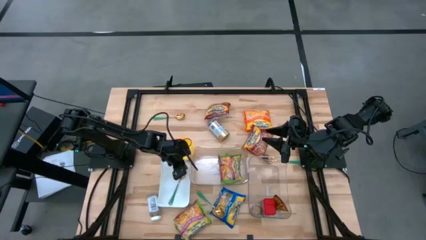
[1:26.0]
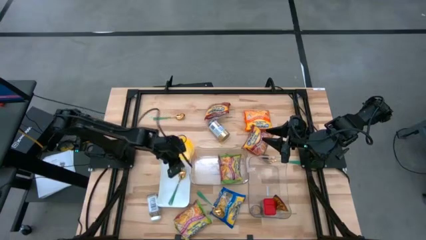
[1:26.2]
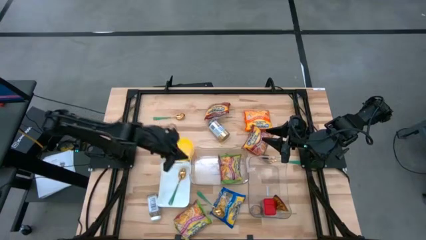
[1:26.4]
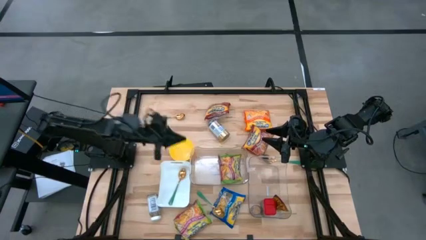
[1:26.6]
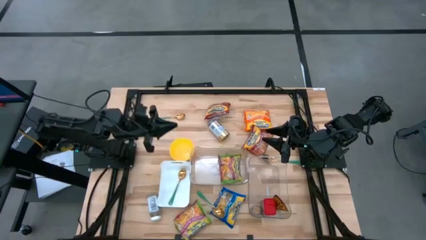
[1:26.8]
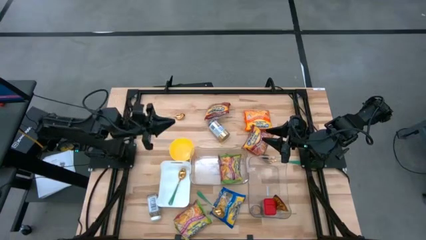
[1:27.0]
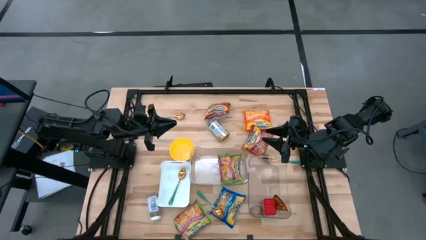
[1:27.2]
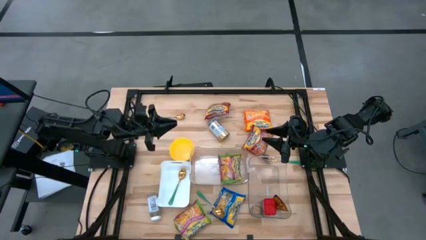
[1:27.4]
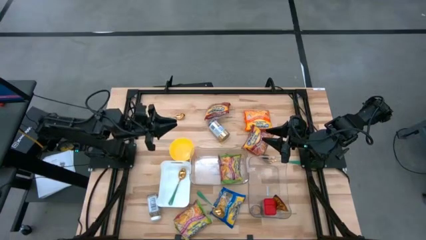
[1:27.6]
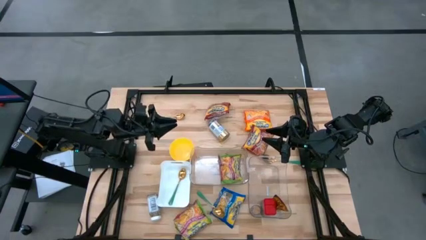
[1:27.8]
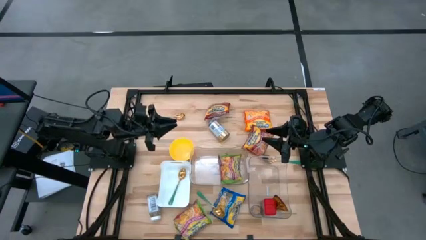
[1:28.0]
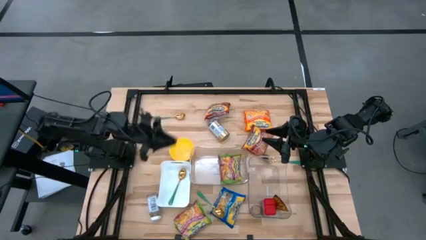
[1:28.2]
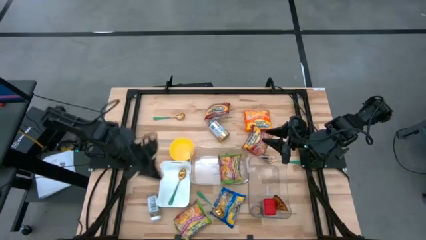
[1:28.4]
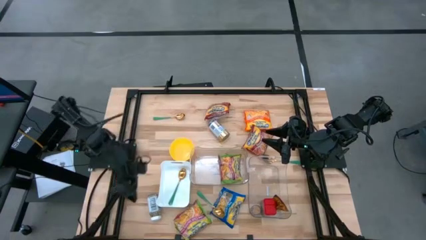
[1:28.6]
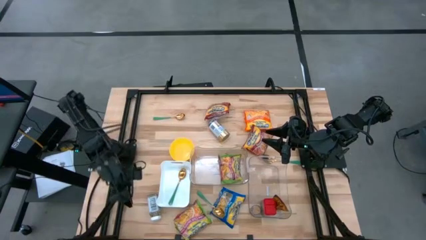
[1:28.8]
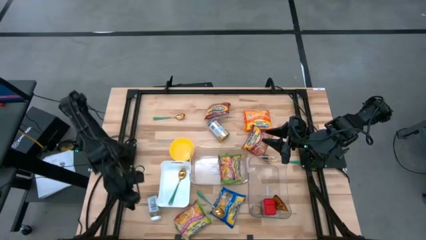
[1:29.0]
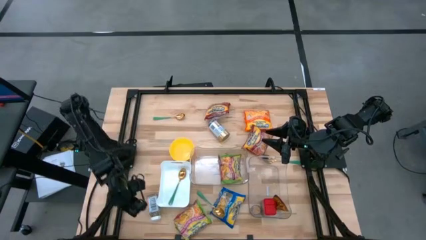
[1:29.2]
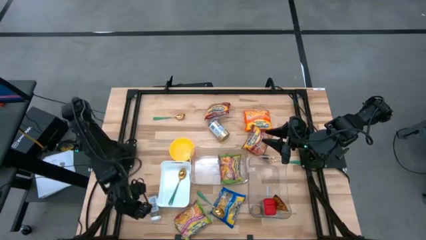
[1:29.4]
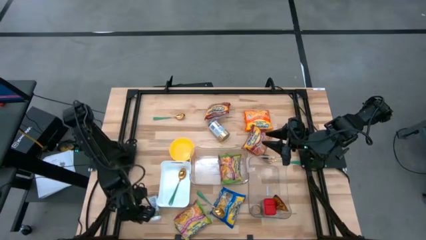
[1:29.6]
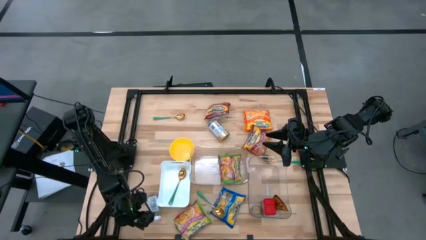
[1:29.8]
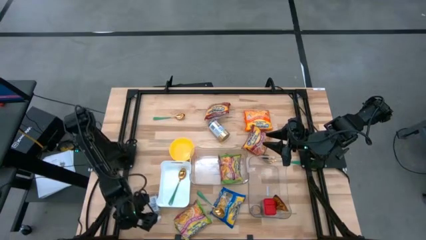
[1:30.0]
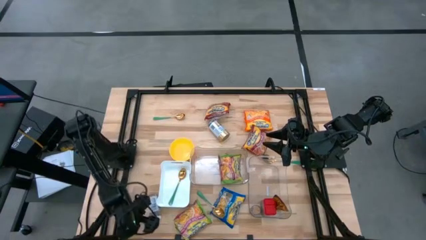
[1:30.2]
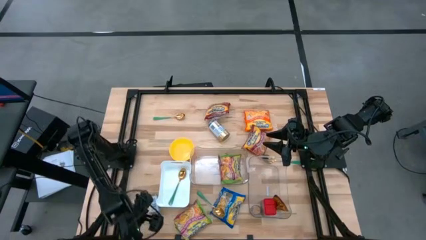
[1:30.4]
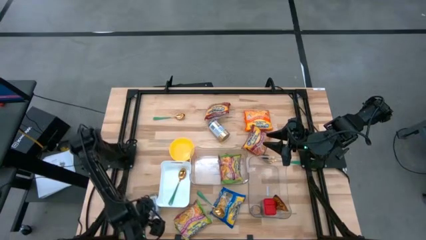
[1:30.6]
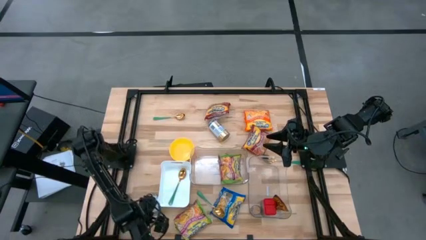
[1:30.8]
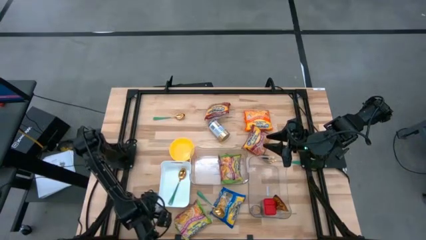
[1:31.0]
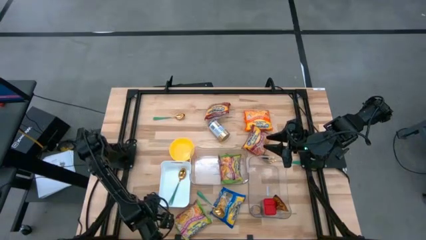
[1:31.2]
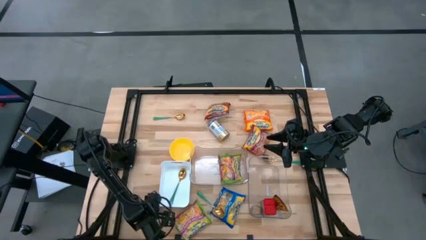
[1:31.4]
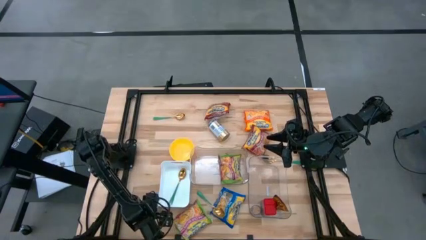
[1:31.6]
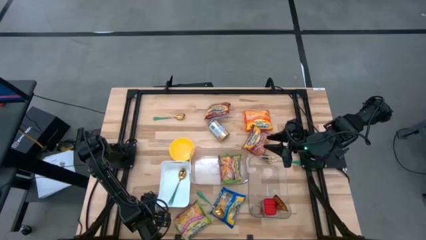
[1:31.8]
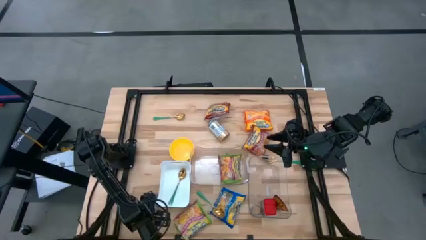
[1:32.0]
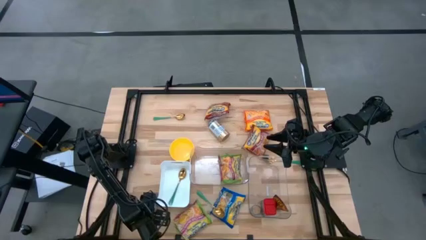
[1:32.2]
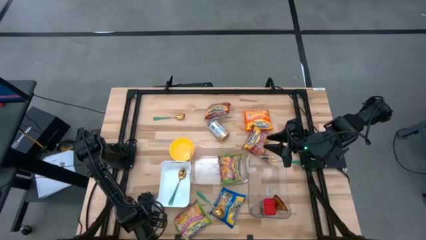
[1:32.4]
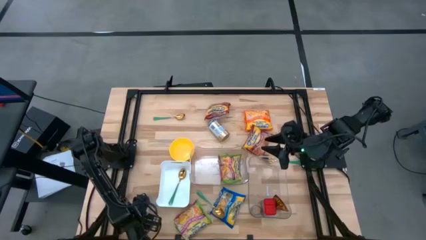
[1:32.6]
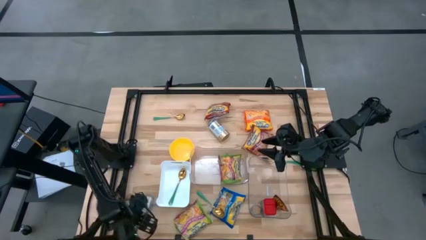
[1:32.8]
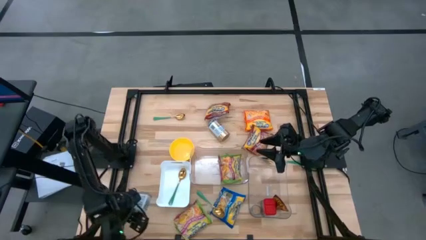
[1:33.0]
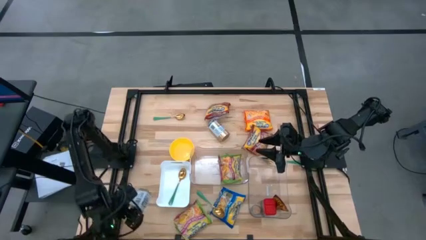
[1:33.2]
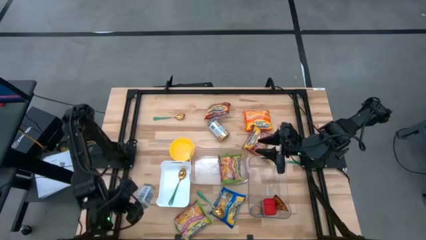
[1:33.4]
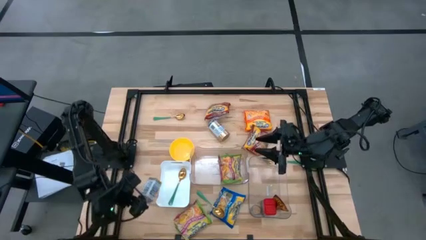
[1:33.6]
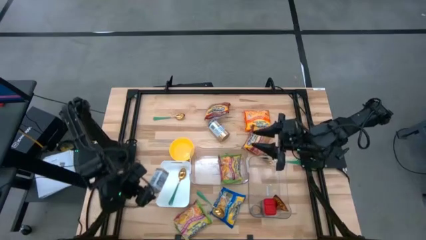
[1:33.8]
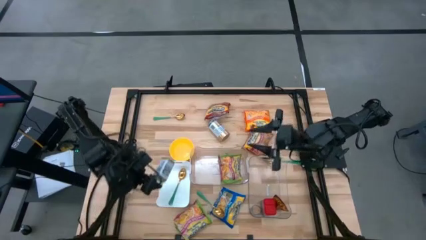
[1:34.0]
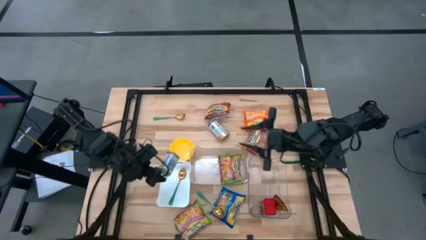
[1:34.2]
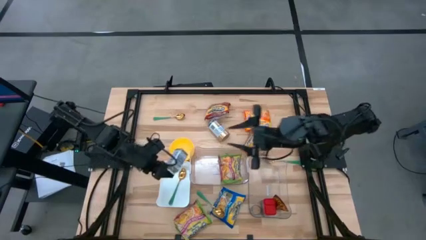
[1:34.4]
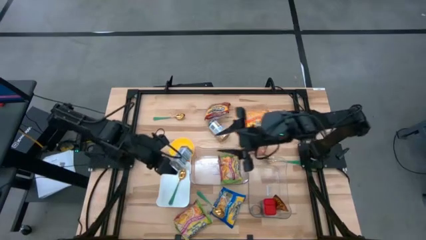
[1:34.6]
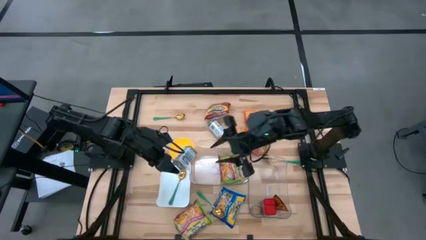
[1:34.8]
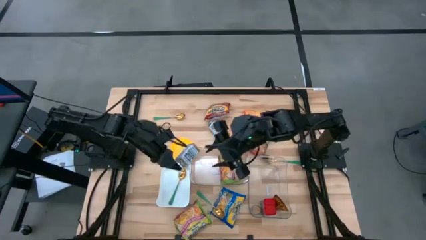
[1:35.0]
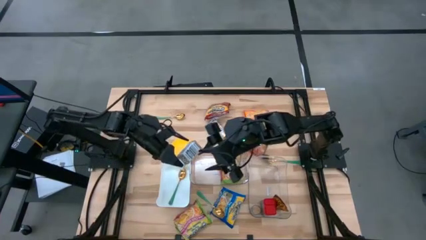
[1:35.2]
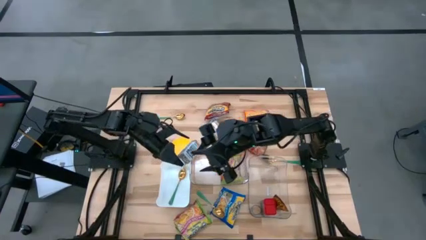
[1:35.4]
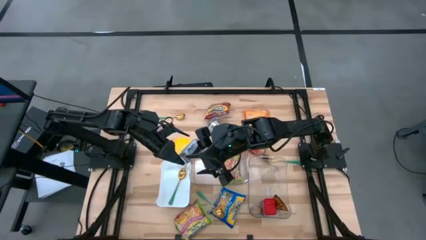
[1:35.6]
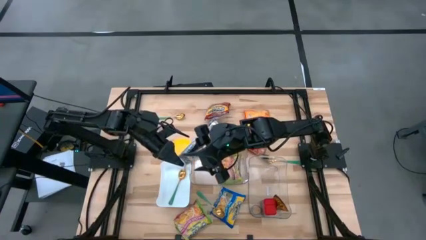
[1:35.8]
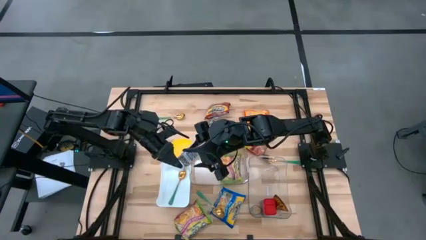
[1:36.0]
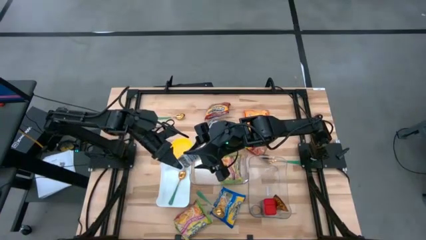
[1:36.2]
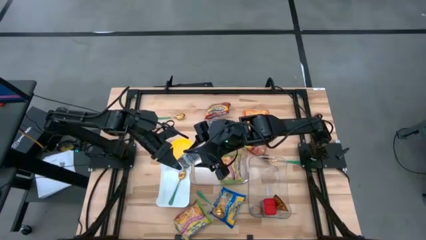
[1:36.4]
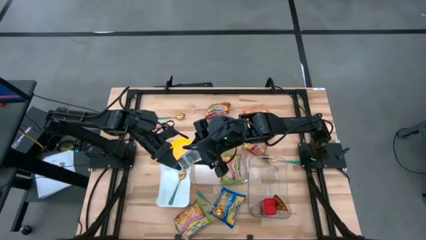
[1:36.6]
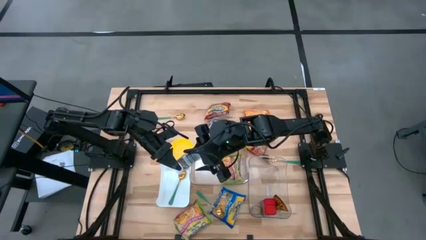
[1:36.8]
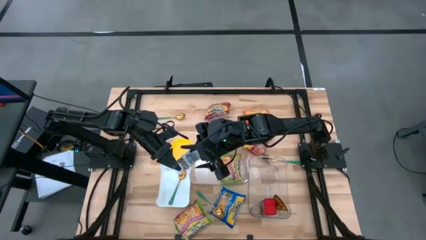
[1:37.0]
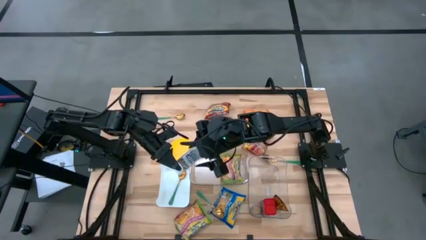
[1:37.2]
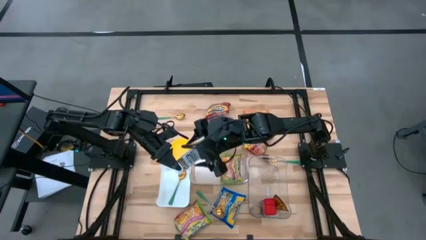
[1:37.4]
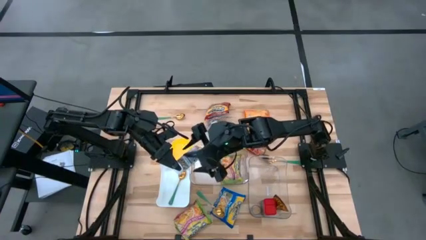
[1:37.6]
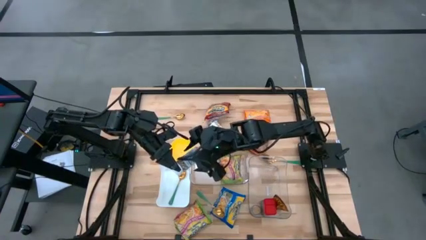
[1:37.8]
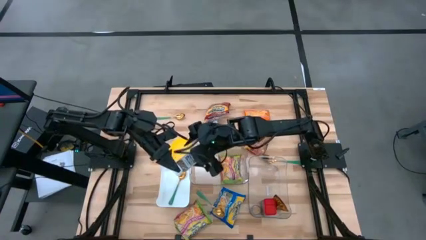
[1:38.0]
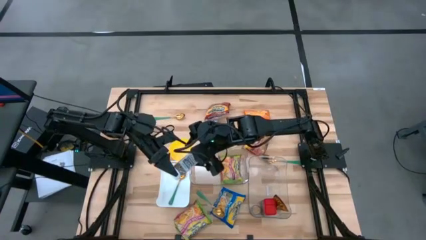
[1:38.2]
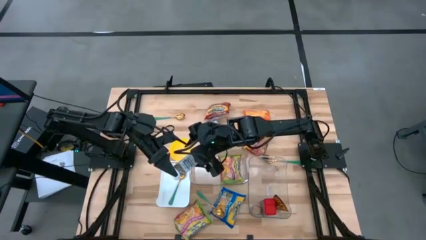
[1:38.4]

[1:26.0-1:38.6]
Task: Pick & Place Food Item
Put the white seasoning bottle into the right transparent bin

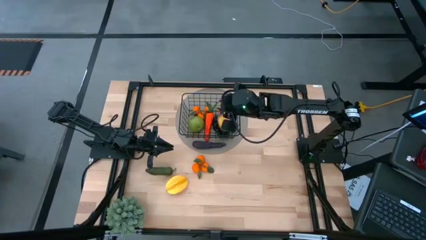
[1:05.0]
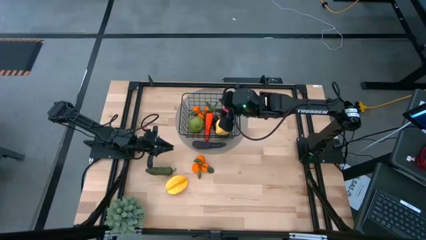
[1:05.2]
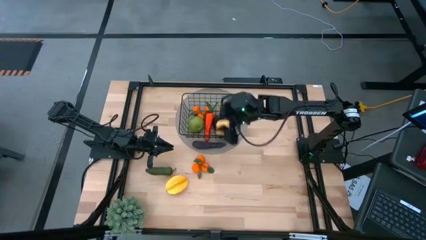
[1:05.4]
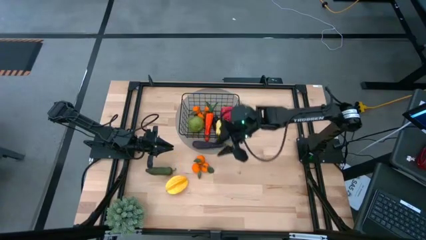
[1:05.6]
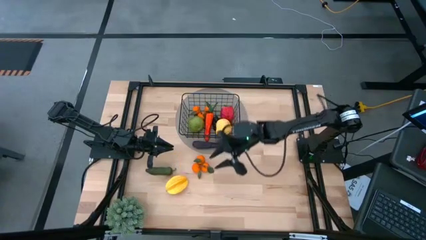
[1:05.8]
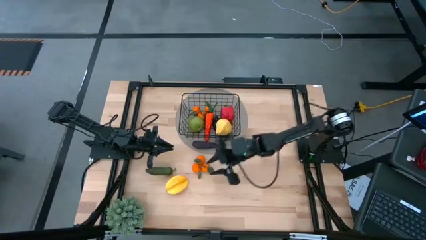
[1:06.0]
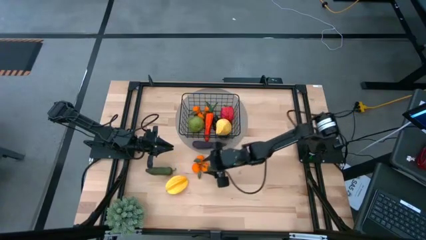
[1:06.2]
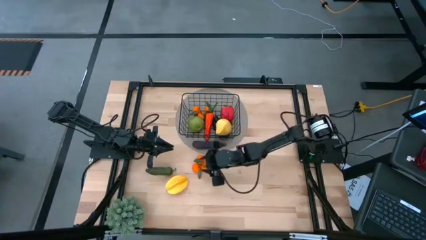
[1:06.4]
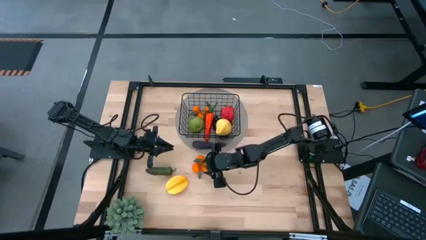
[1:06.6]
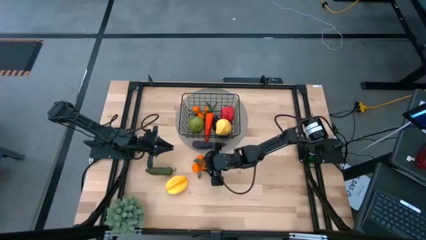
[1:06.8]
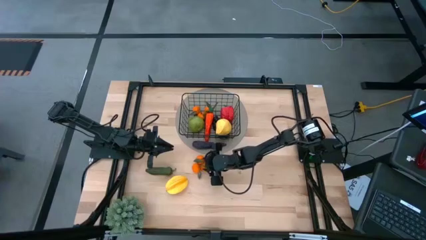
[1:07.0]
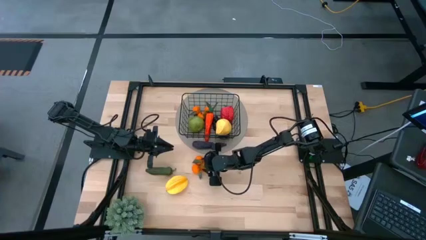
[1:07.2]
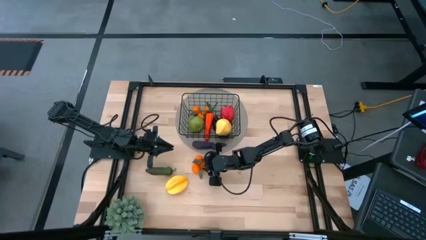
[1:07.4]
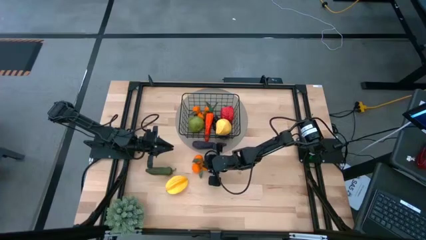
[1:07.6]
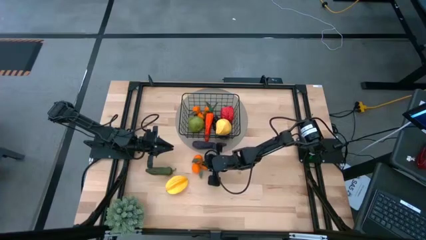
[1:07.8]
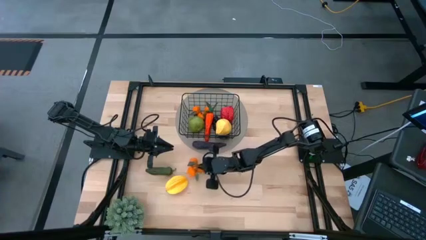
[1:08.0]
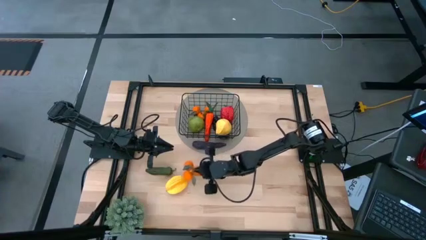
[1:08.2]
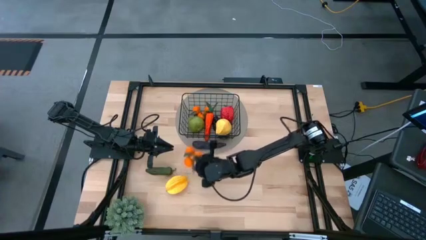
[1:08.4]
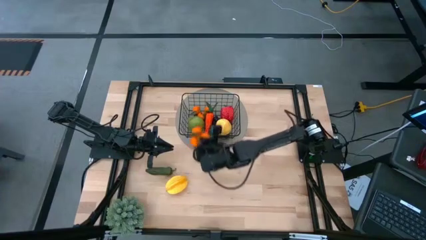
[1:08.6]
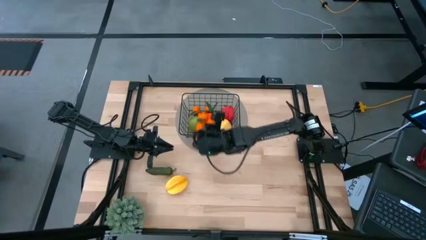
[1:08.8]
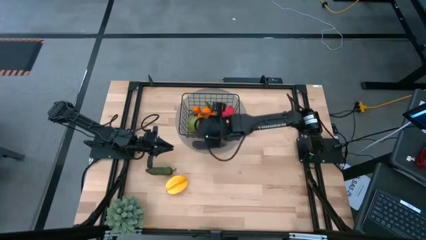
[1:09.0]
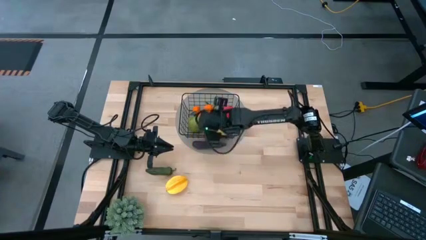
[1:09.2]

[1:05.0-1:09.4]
Task: Build produce basket
Put the tangerine into the wire organizer
